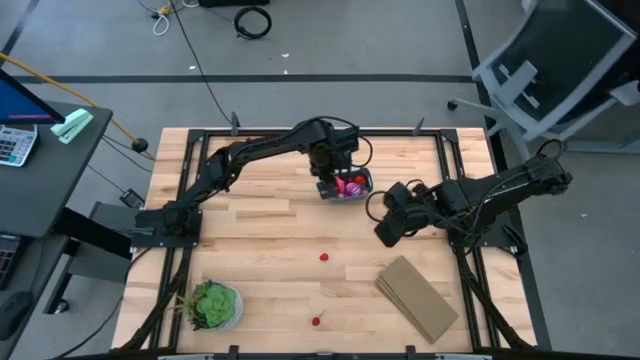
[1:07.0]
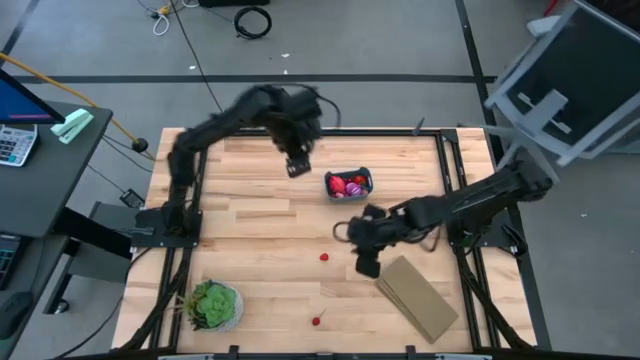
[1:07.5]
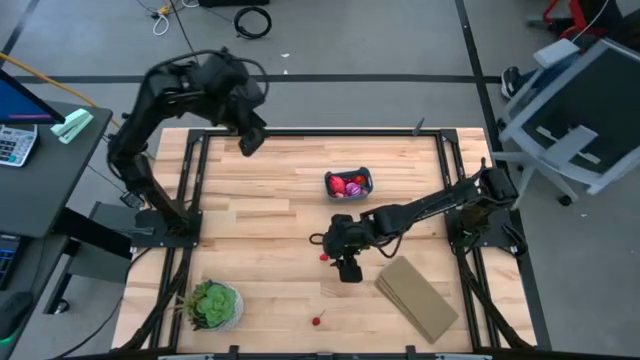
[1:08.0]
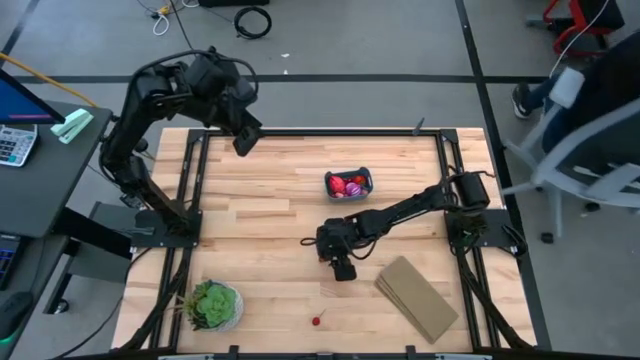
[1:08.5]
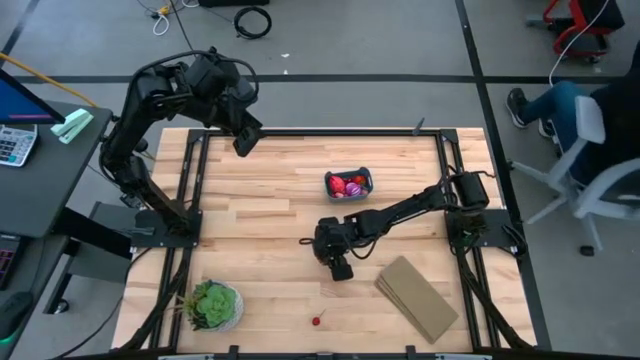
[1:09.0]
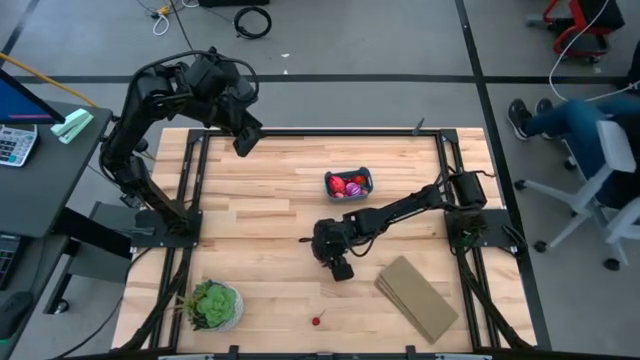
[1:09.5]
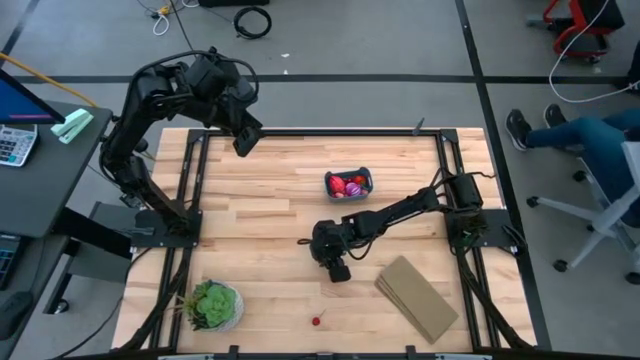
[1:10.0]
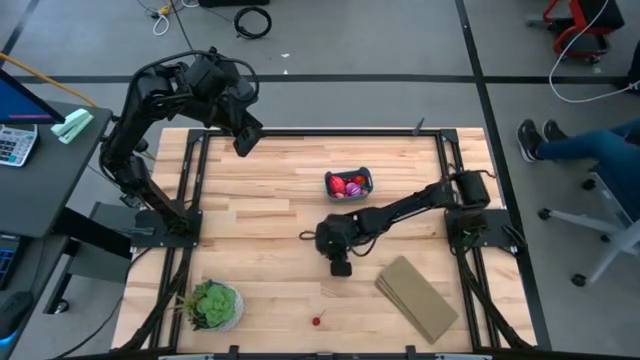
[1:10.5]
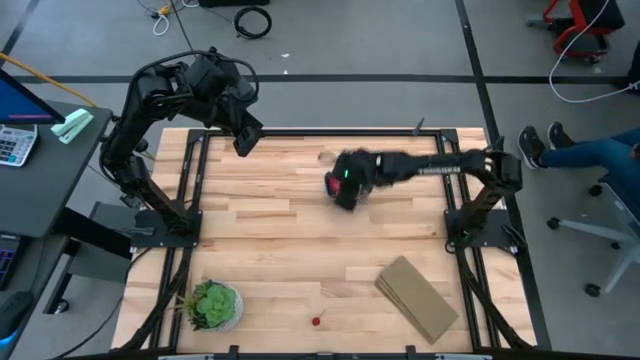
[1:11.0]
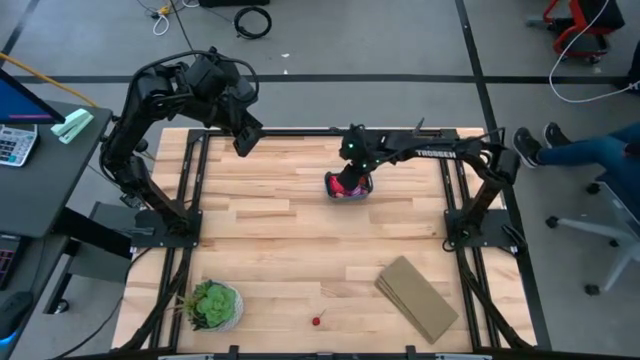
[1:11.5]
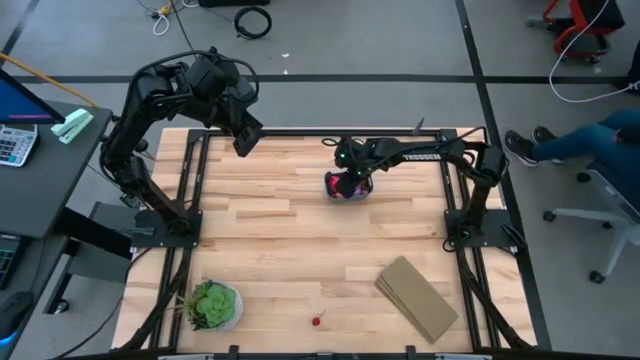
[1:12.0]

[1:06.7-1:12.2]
Task: Pick and placing Produce into tupperware
Put the raspberry into the bin

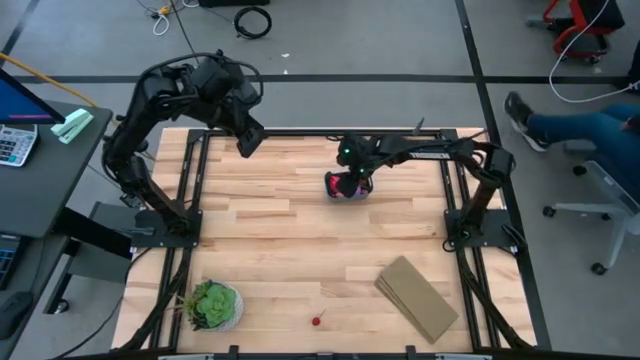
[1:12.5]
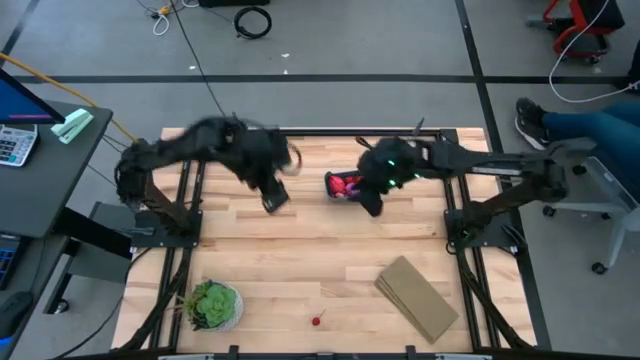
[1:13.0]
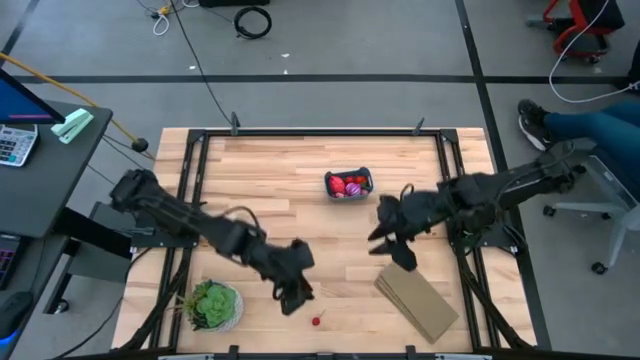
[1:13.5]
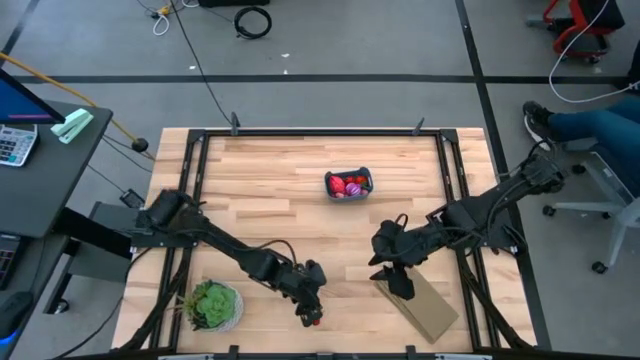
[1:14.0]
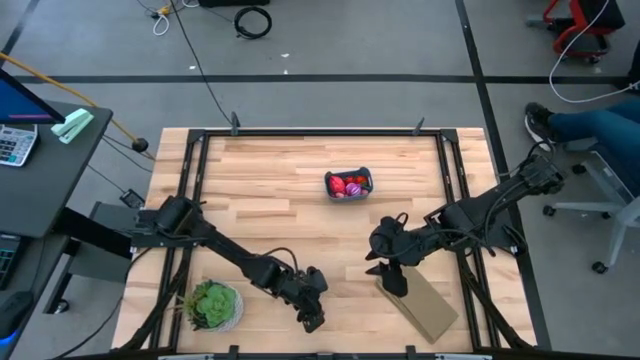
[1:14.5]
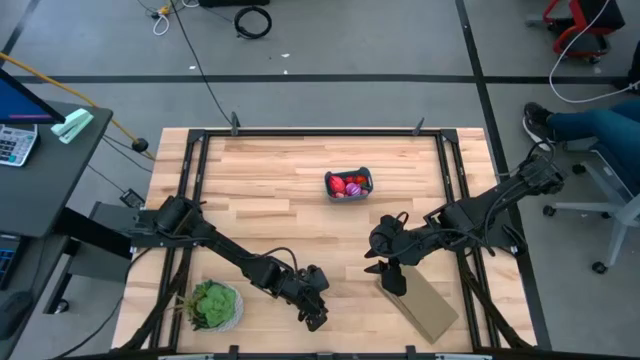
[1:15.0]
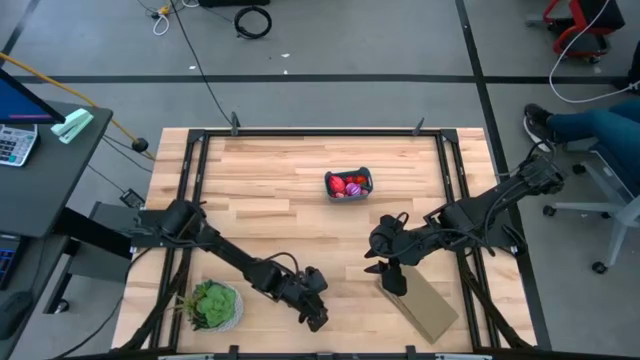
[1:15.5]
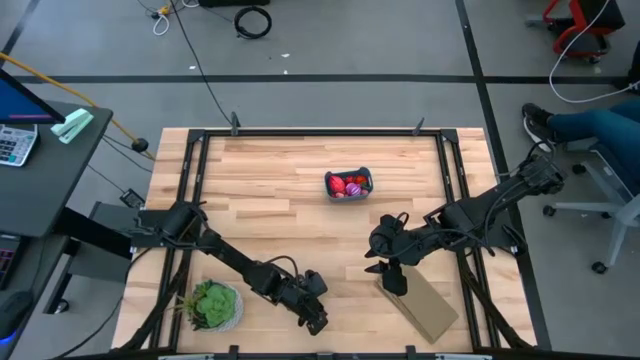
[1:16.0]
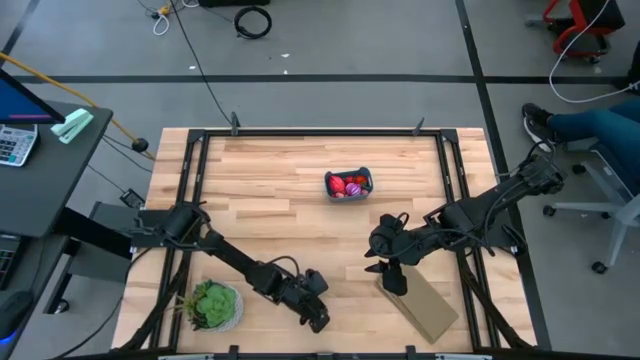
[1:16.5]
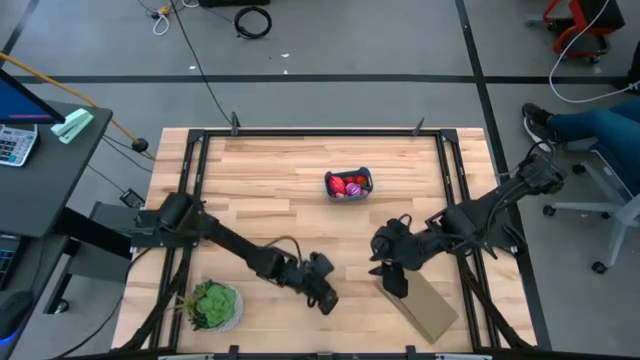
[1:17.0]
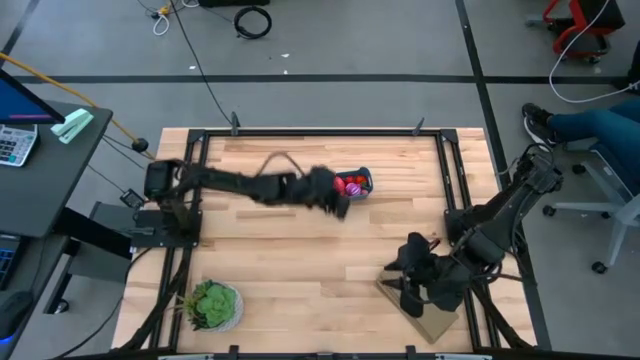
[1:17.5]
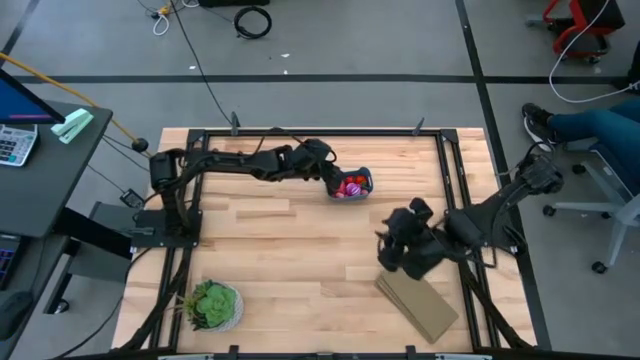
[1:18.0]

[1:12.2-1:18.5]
Put the cherry into the bin

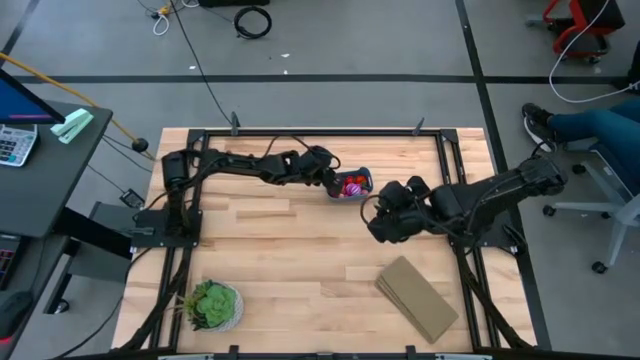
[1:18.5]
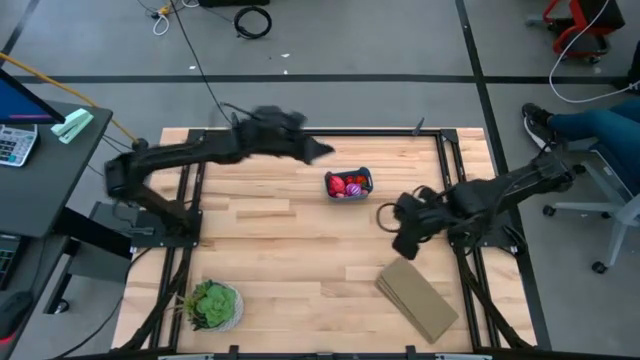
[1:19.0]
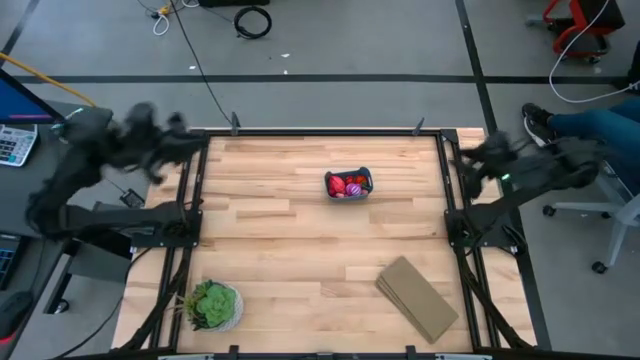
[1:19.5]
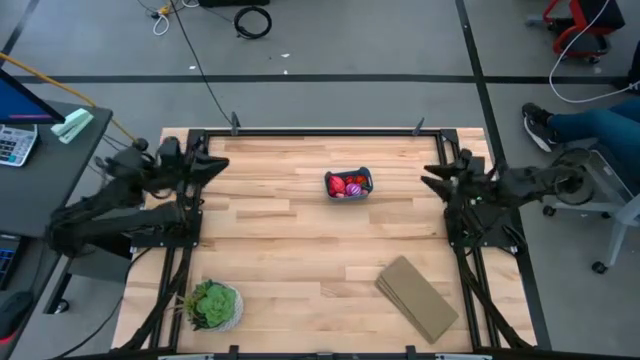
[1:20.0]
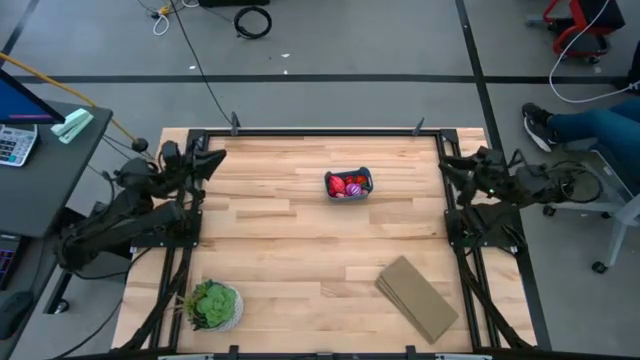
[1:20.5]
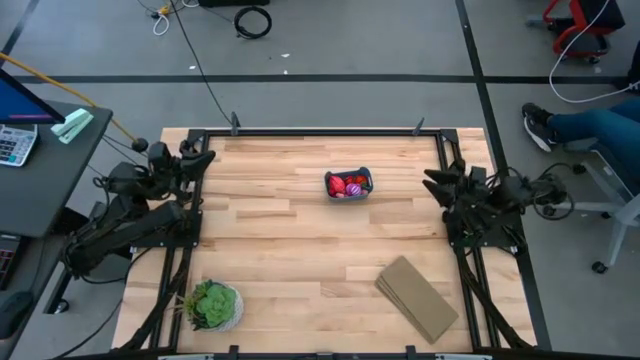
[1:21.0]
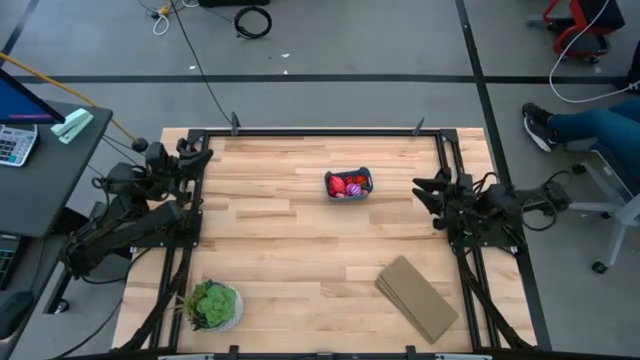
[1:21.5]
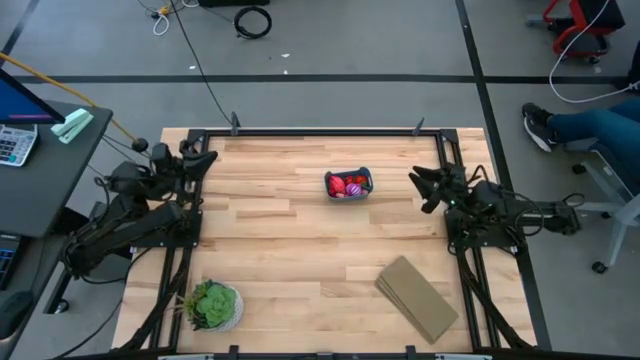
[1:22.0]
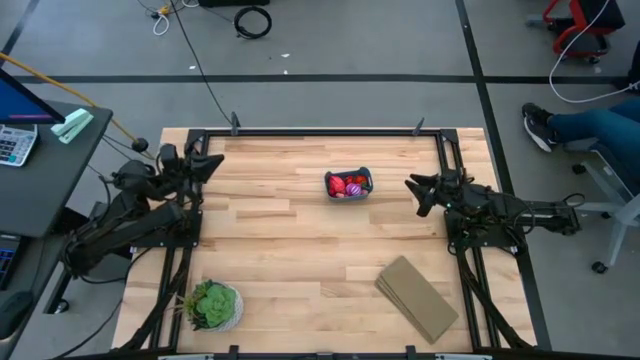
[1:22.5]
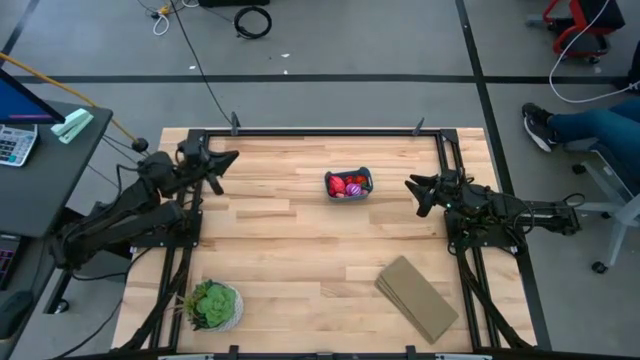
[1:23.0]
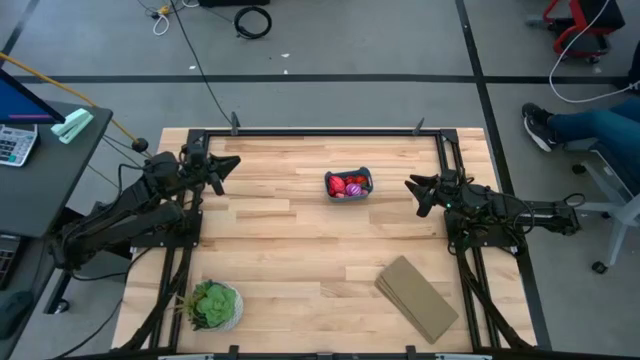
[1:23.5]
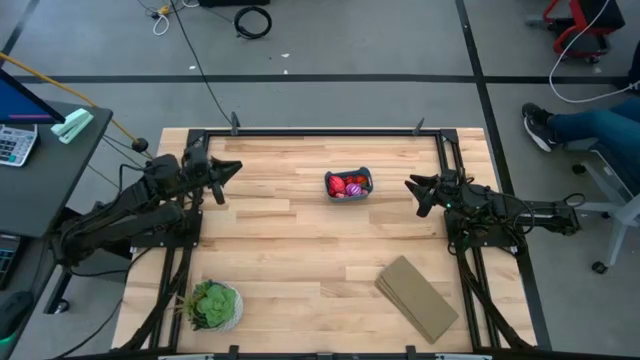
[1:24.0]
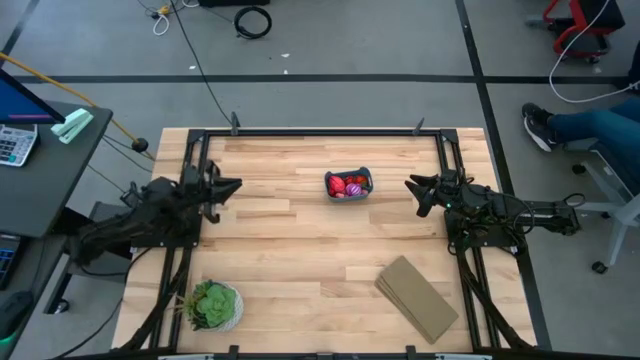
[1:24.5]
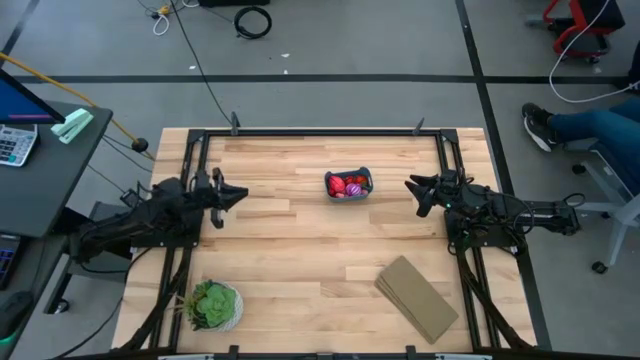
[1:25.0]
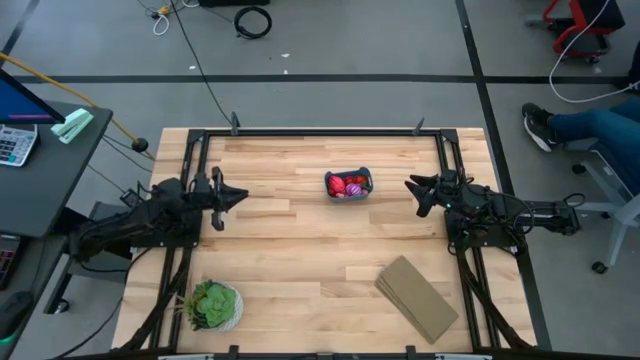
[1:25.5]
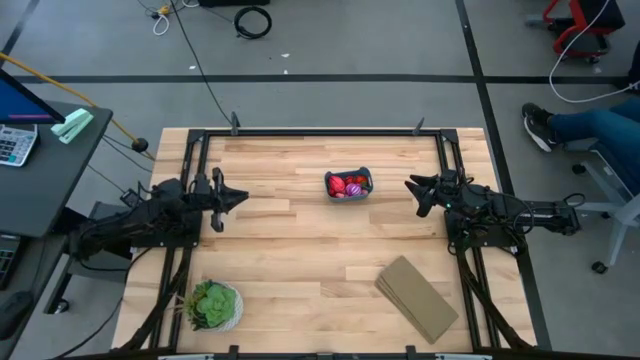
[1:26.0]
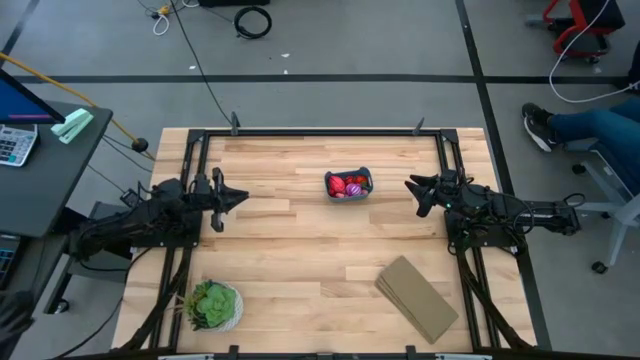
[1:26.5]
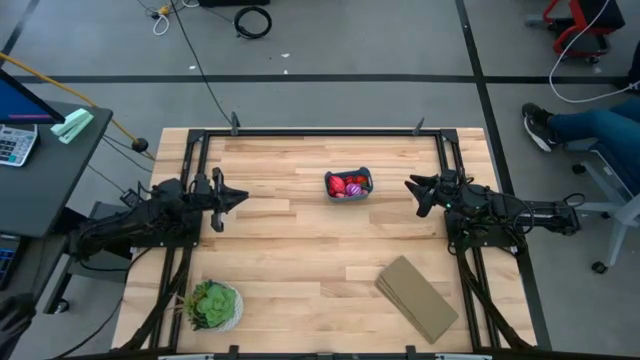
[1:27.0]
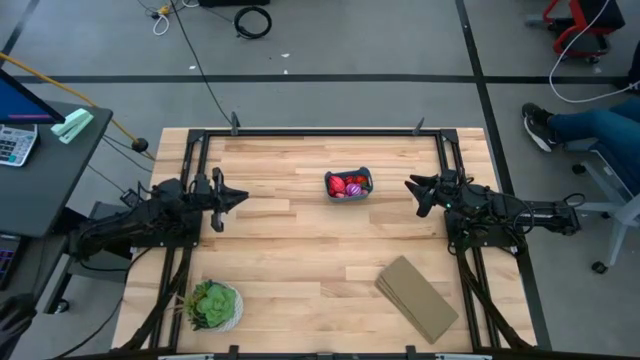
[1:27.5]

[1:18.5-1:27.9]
Return to Home Position

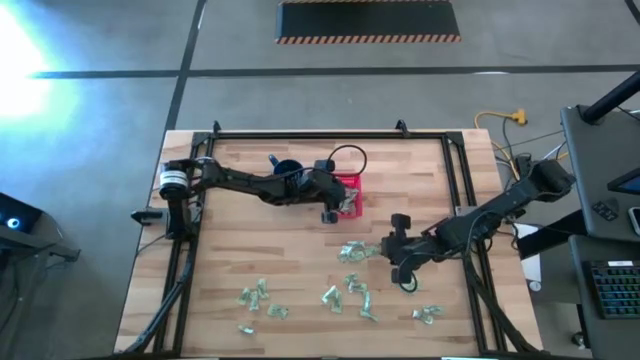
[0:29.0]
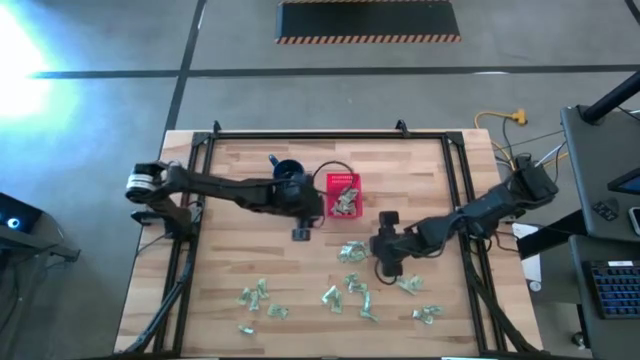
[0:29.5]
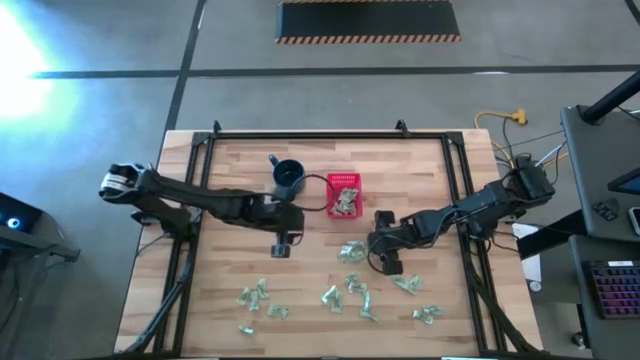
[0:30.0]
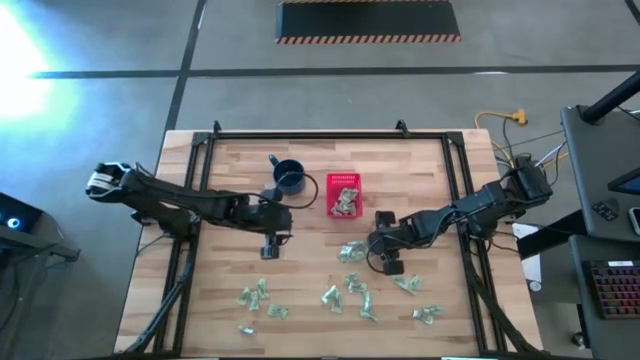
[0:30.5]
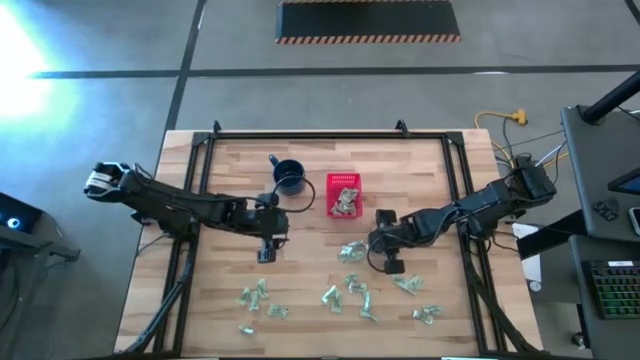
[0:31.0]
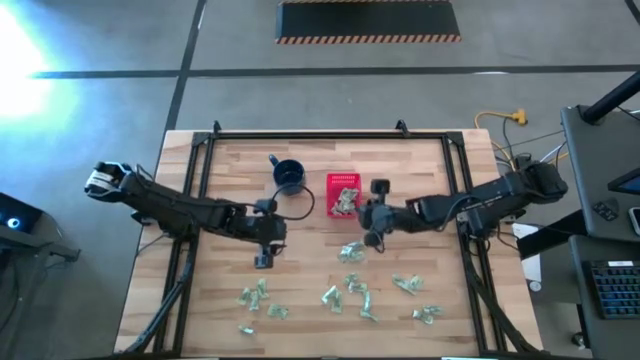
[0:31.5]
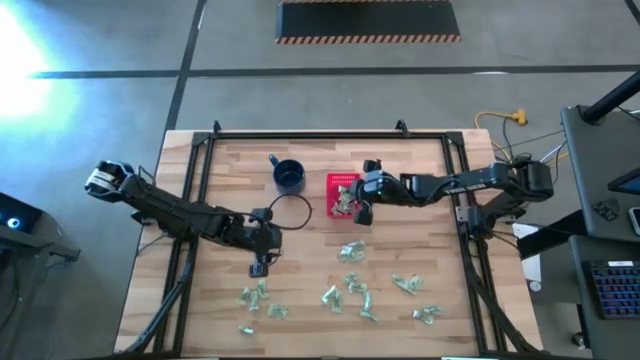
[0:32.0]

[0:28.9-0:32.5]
Task: Pick and place items into bin
Put the green stevia packet into the red bin
